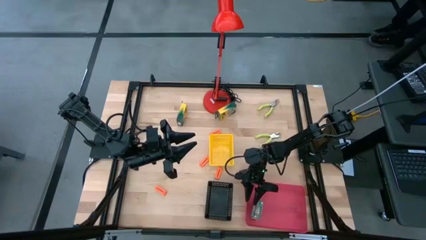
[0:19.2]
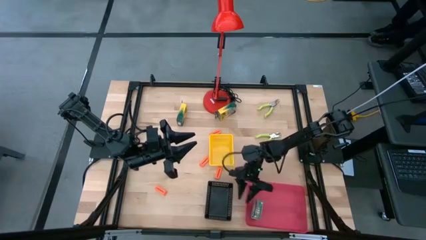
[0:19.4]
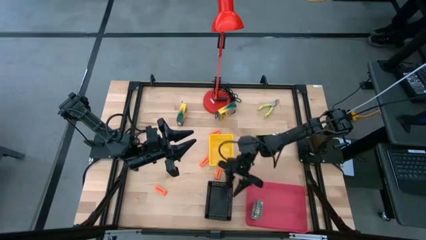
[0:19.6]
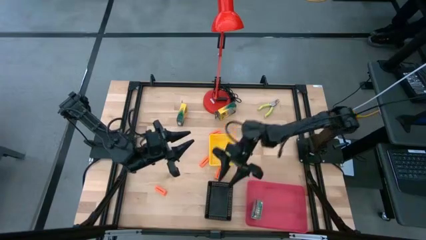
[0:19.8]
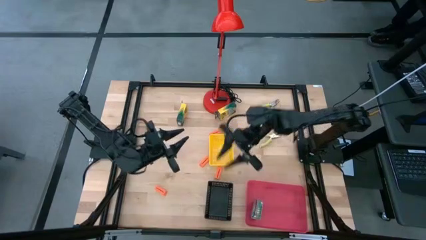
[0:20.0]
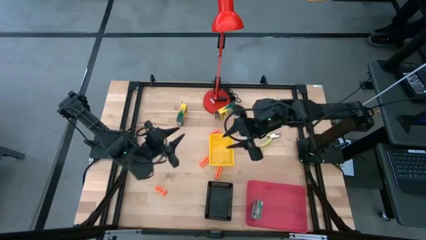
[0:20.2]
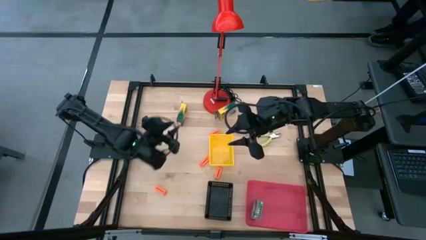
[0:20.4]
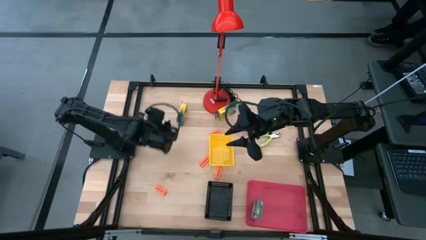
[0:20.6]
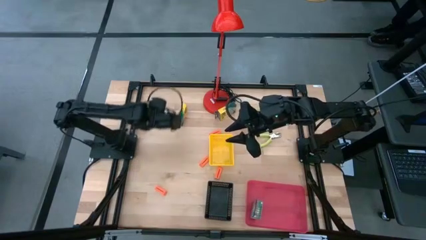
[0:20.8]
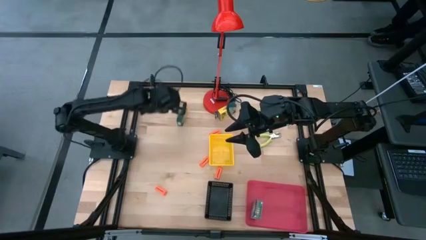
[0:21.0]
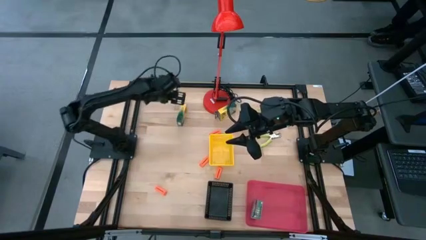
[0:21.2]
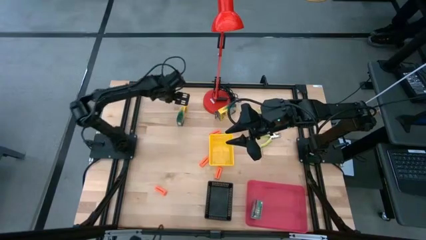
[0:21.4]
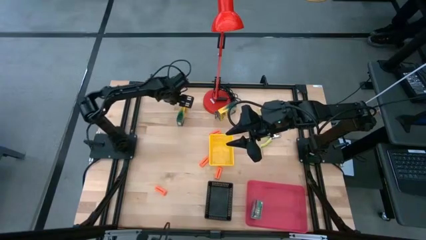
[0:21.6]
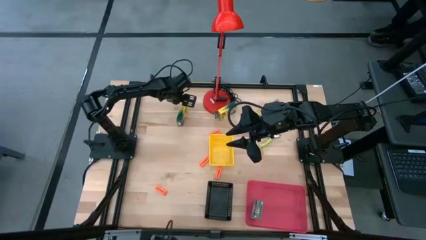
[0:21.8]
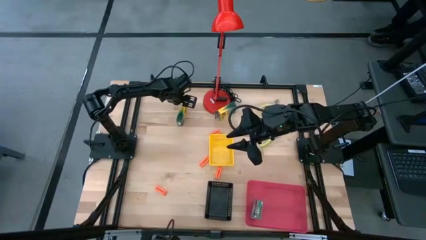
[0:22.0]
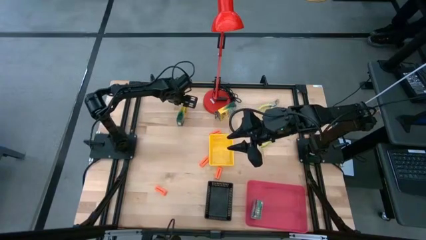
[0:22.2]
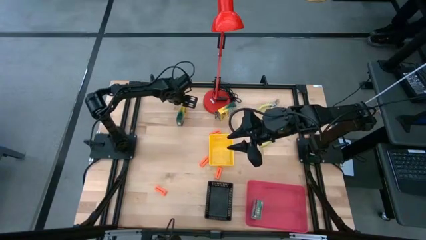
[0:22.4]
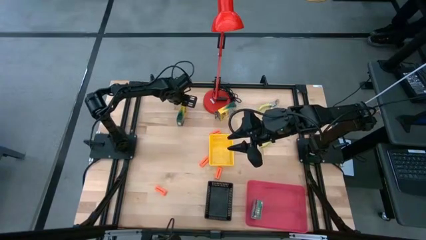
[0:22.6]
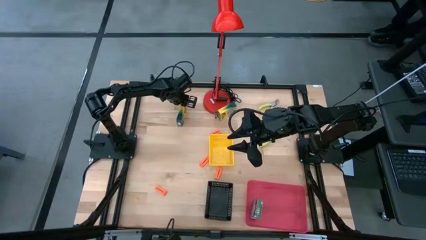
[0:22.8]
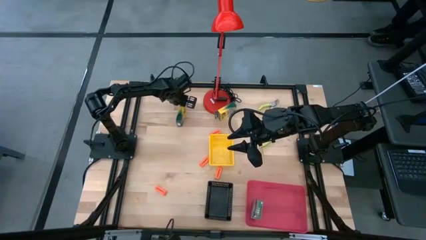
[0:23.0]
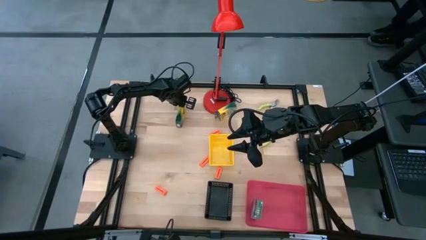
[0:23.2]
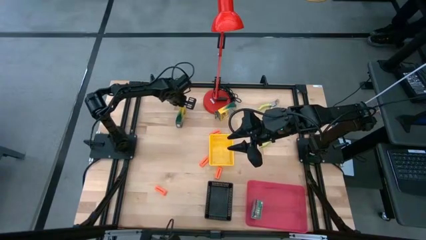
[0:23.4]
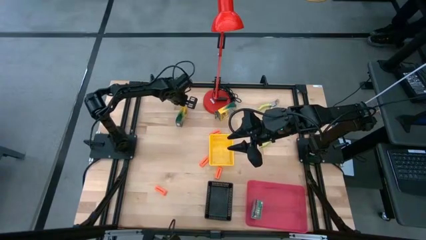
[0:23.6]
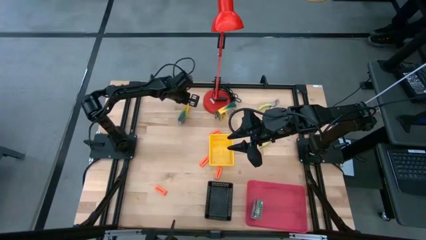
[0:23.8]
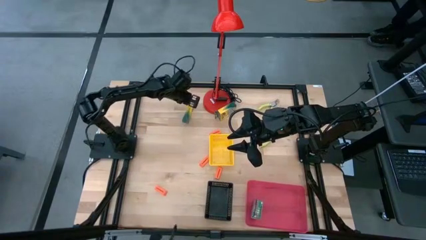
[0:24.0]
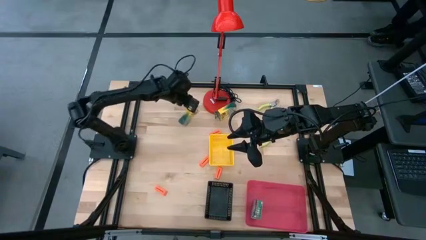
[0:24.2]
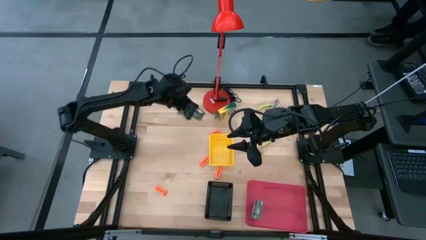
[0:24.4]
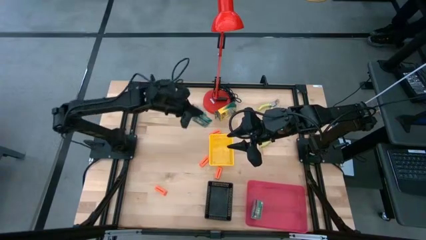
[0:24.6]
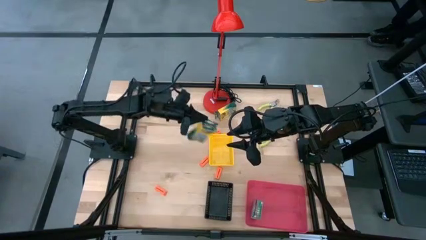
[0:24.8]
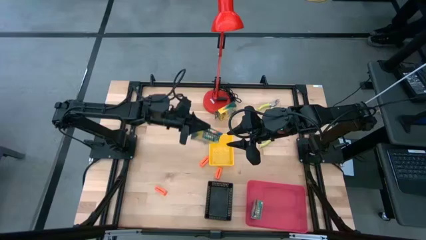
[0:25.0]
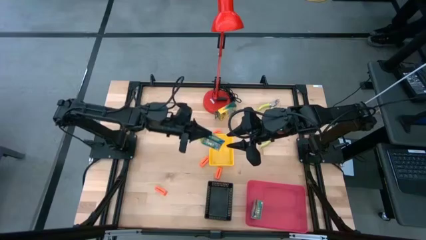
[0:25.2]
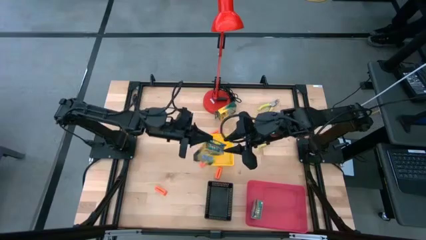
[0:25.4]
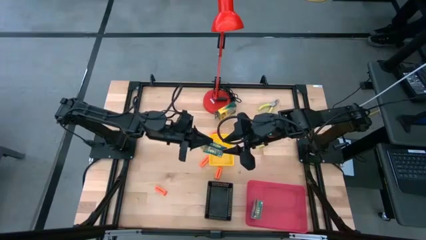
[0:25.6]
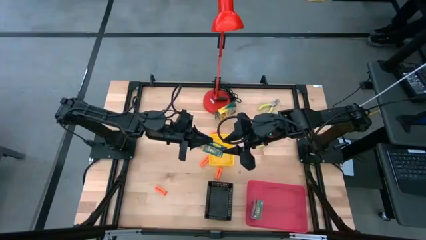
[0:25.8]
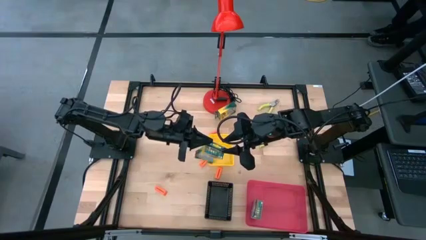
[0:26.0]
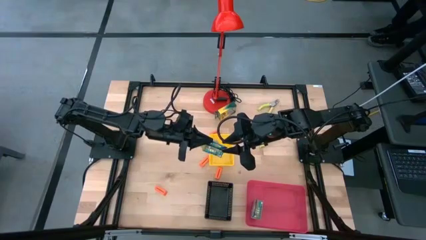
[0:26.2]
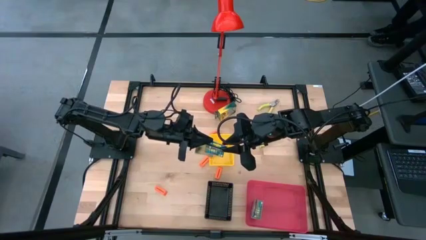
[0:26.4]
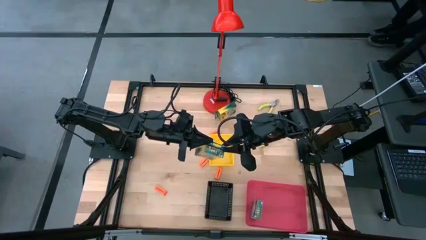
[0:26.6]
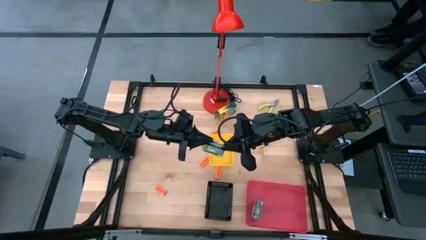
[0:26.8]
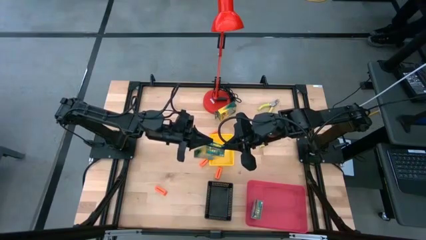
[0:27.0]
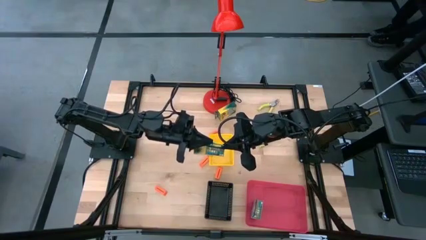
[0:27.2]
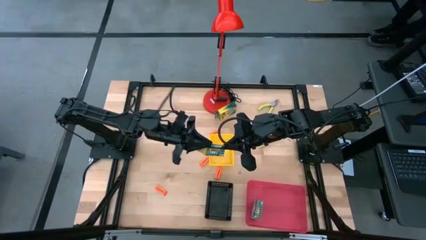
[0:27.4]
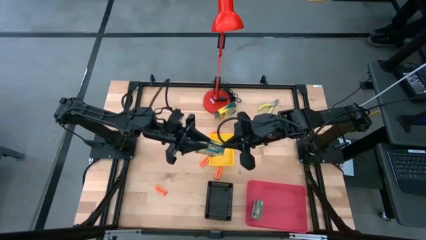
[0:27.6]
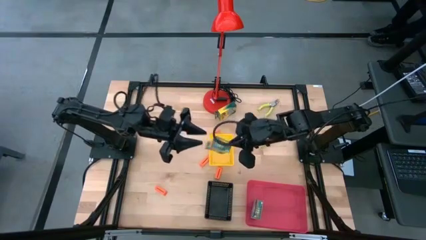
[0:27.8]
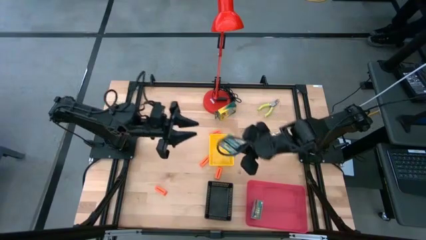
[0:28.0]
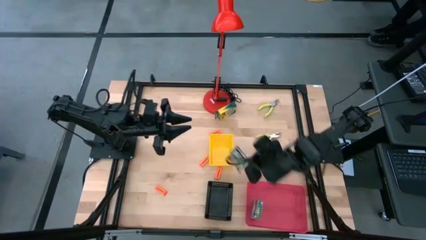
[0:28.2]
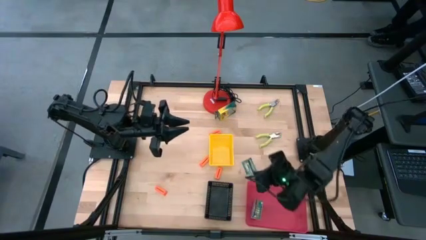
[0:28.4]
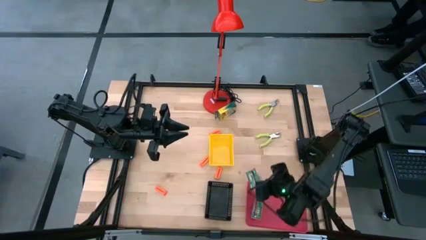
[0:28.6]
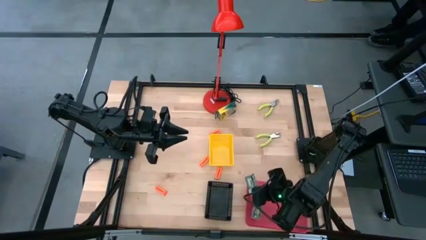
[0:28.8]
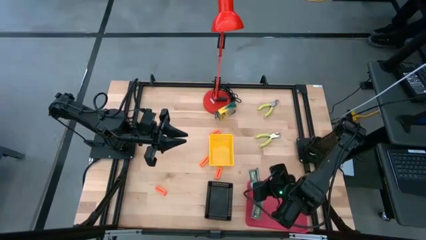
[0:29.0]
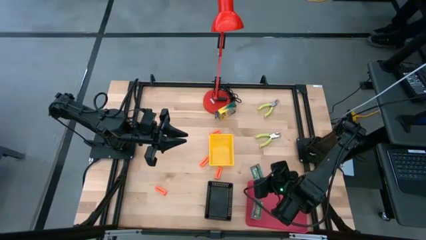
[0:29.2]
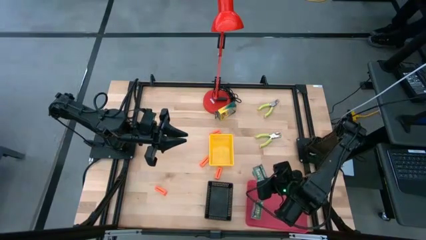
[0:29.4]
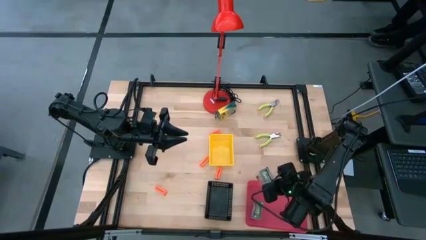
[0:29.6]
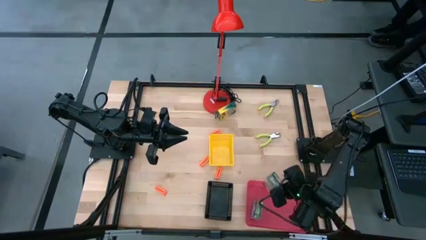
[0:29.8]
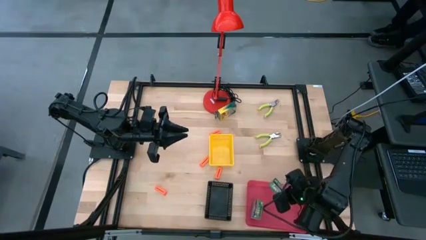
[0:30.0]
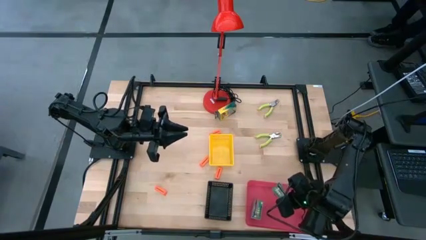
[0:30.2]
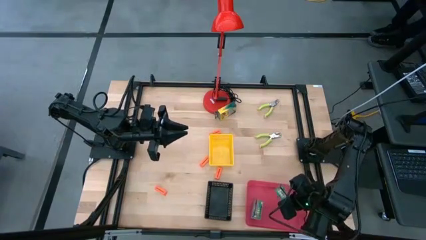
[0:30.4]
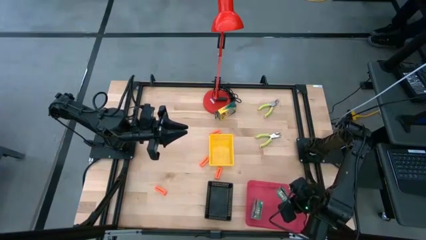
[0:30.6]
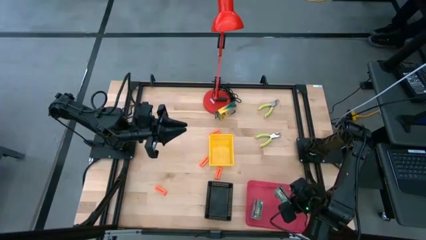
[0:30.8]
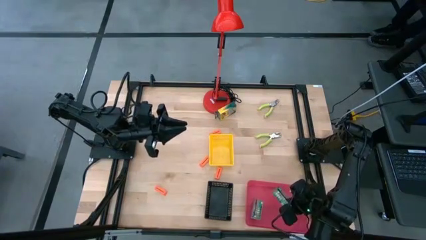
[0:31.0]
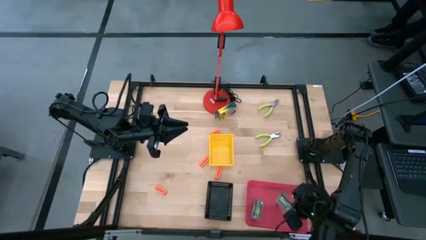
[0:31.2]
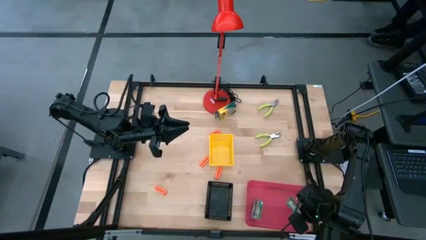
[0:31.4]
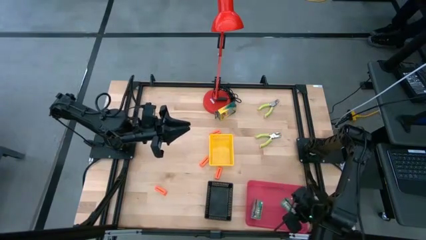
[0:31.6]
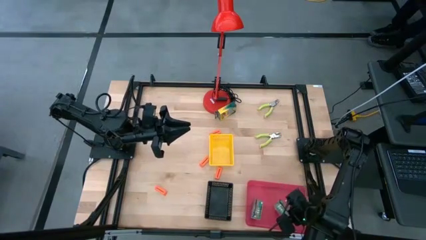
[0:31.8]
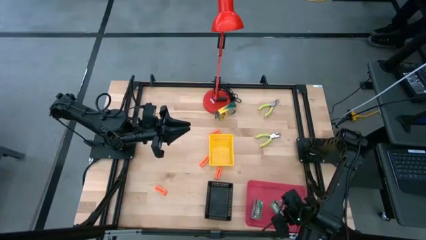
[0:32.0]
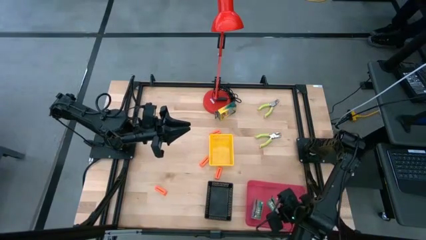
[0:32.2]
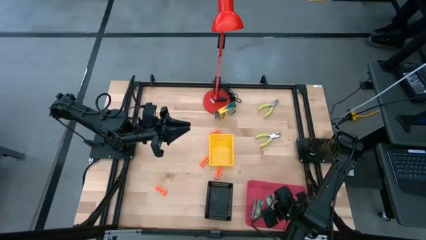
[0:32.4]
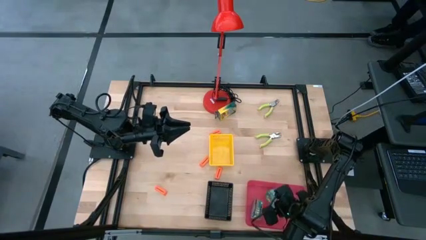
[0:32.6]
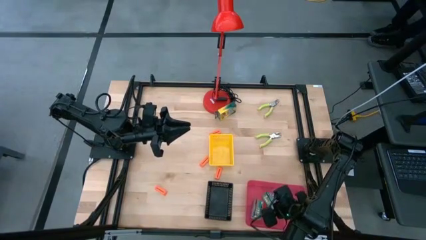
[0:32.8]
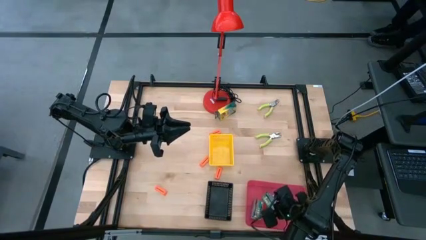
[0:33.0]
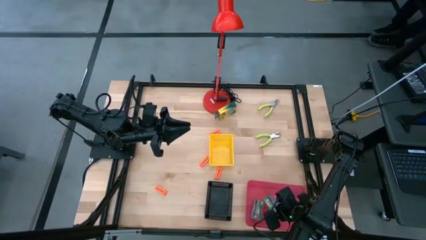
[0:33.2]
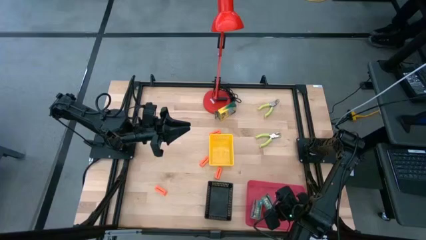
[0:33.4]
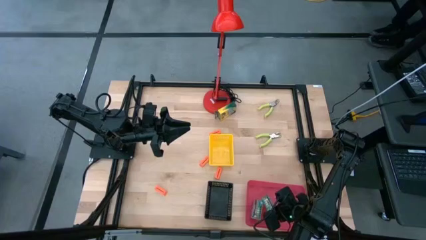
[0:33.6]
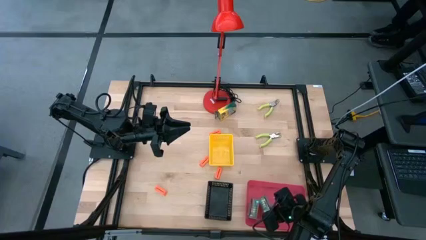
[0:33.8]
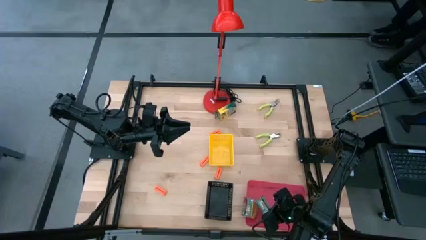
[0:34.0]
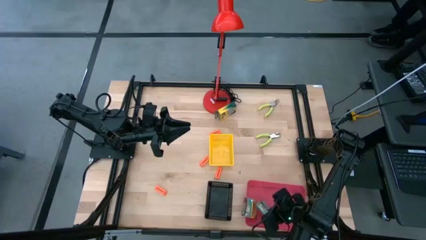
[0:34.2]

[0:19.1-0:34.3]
Task: Pick & Place School Supplies
Put the yellow crayon box into the pink bin
